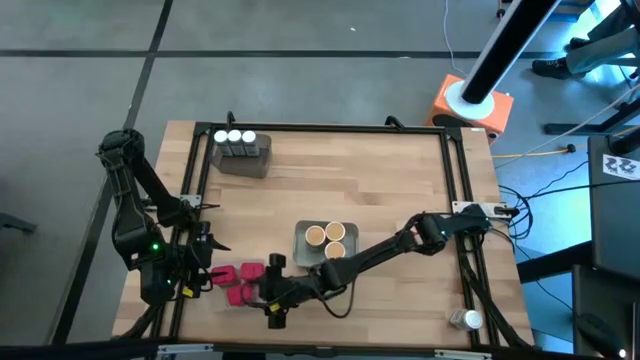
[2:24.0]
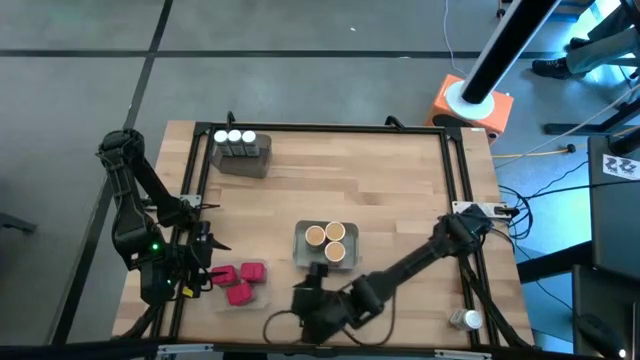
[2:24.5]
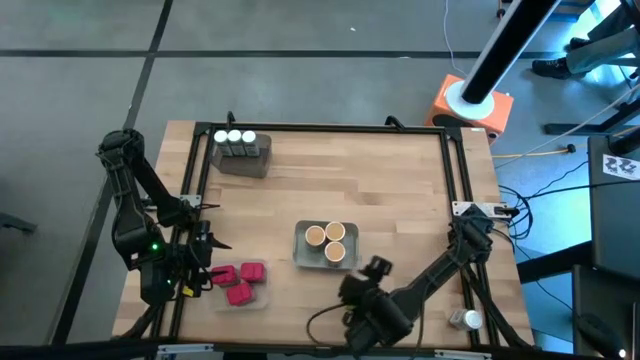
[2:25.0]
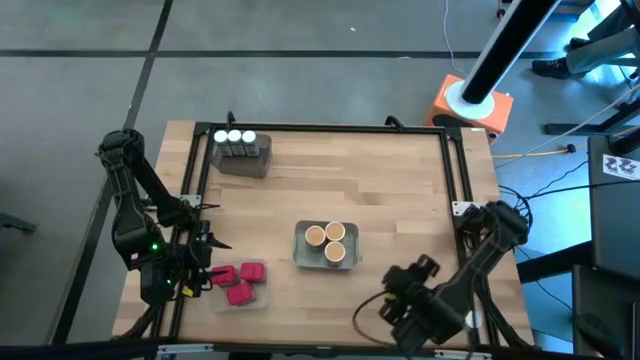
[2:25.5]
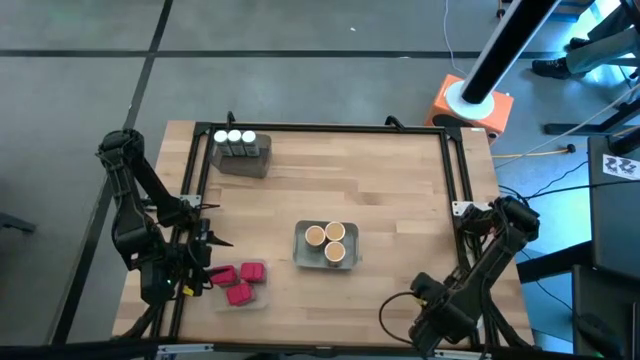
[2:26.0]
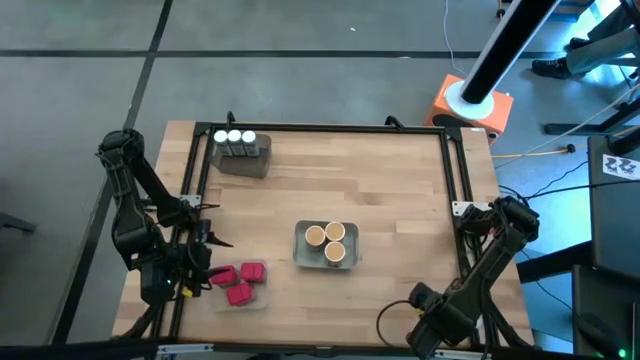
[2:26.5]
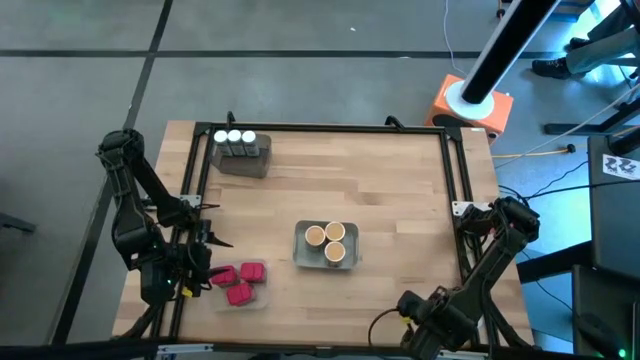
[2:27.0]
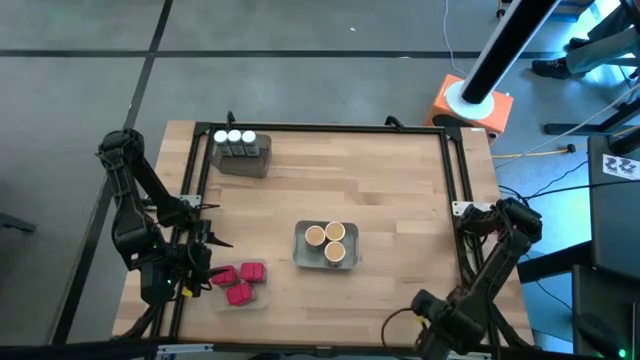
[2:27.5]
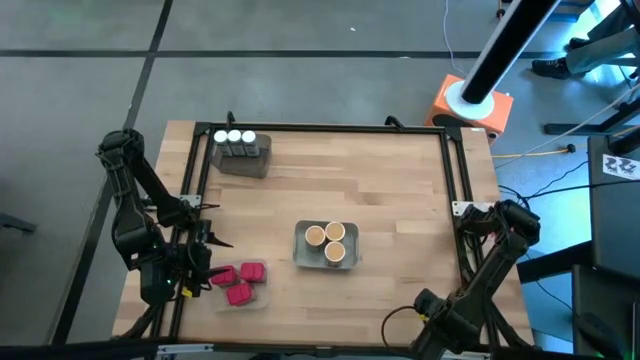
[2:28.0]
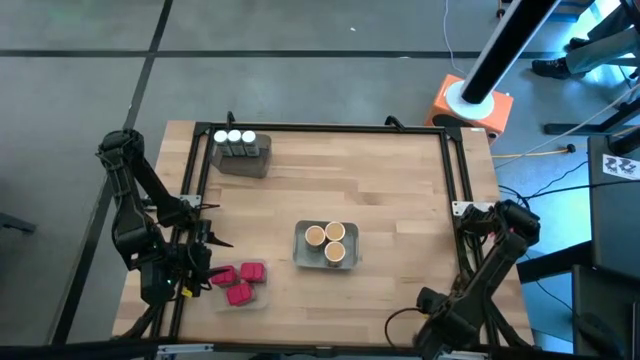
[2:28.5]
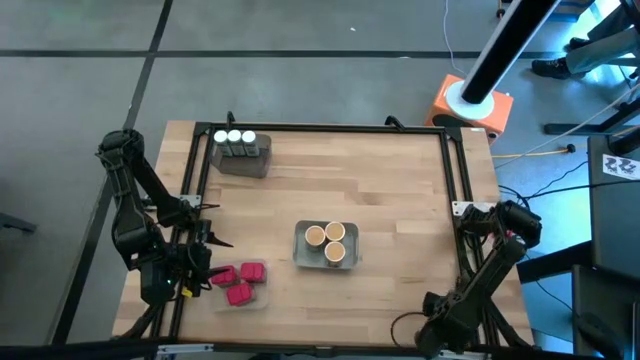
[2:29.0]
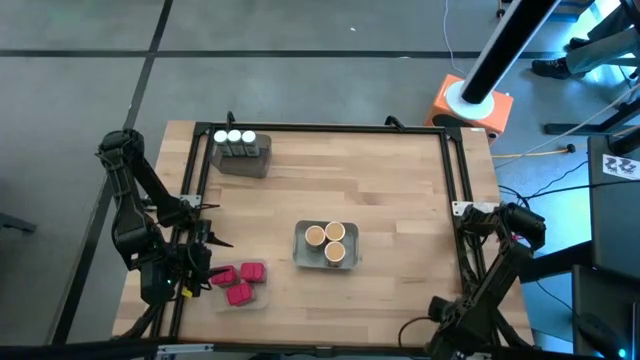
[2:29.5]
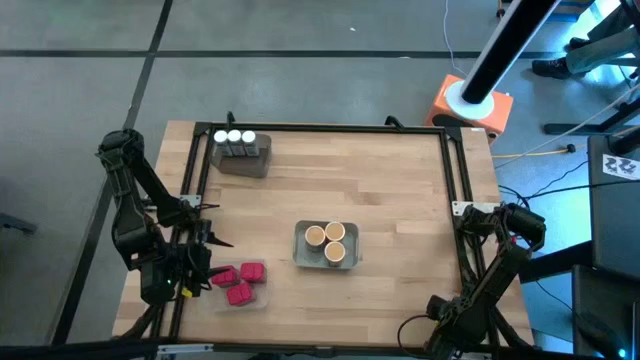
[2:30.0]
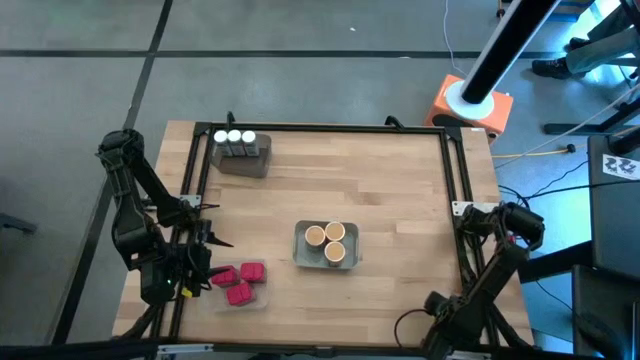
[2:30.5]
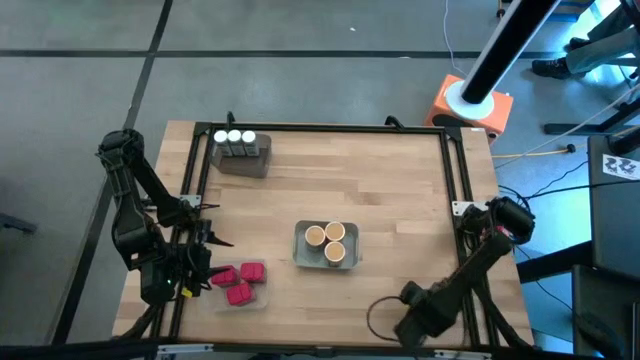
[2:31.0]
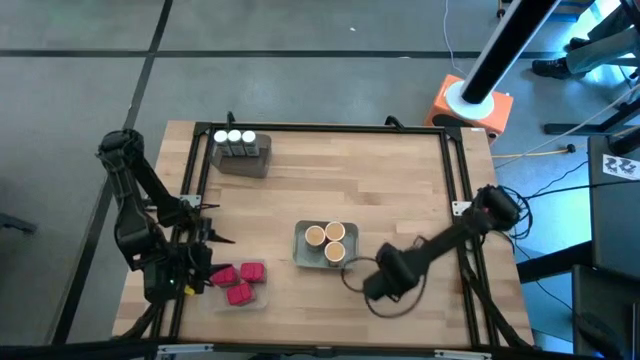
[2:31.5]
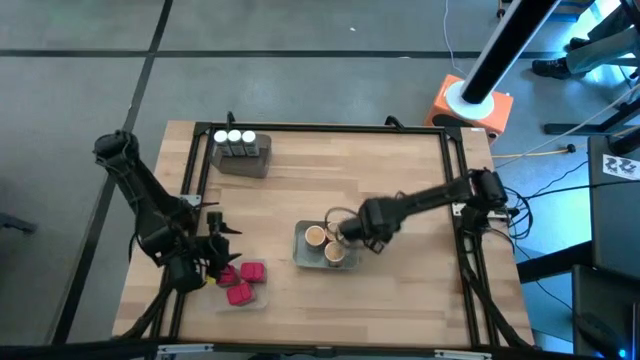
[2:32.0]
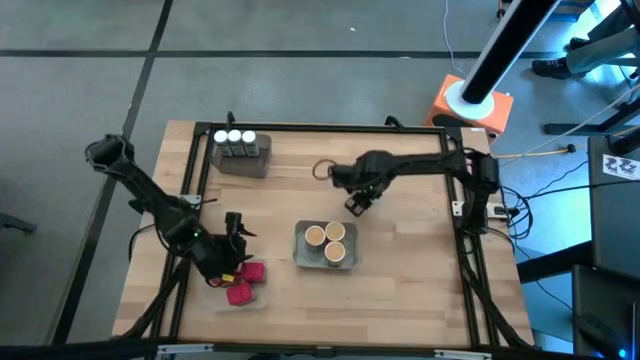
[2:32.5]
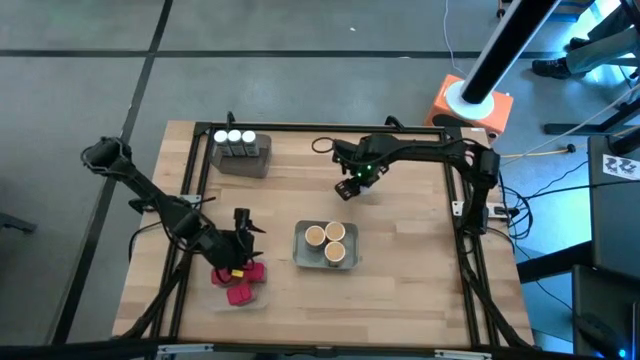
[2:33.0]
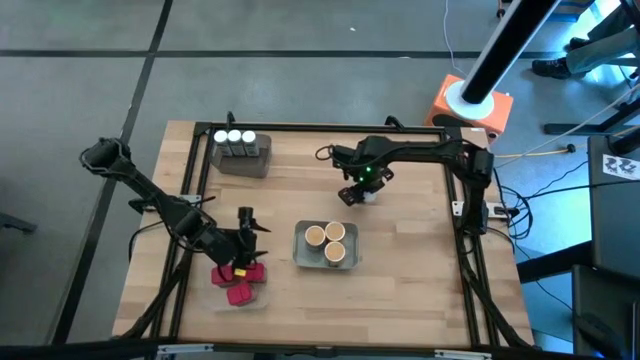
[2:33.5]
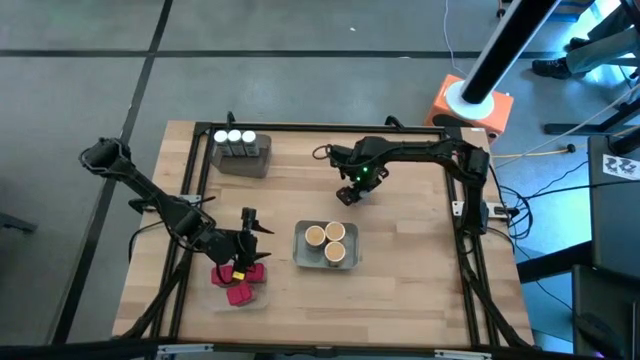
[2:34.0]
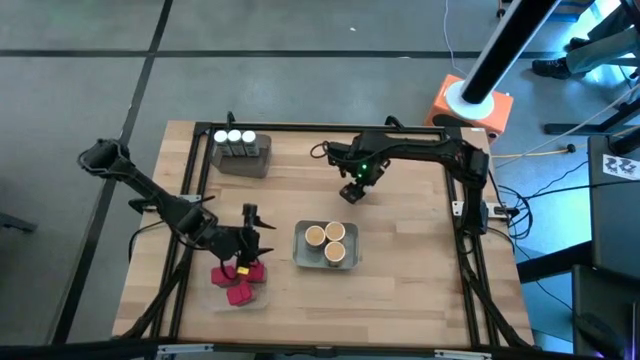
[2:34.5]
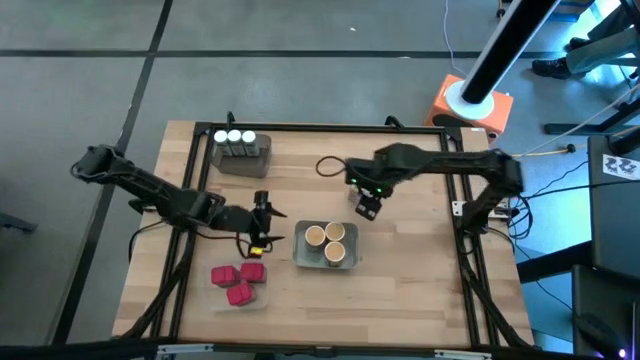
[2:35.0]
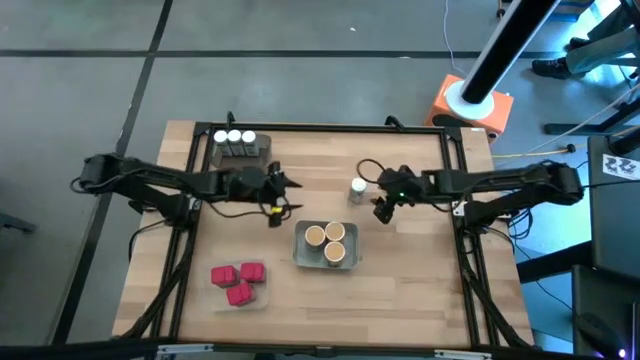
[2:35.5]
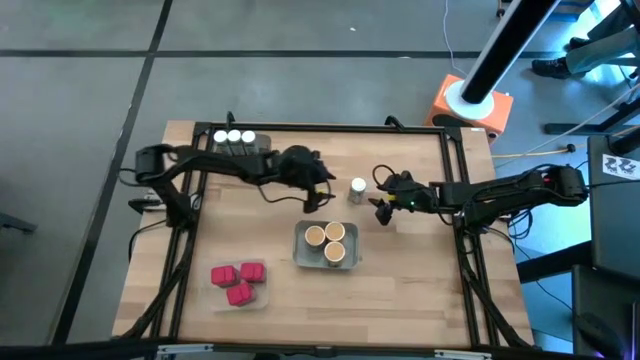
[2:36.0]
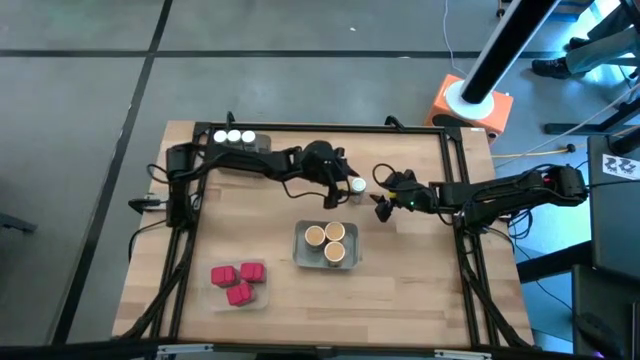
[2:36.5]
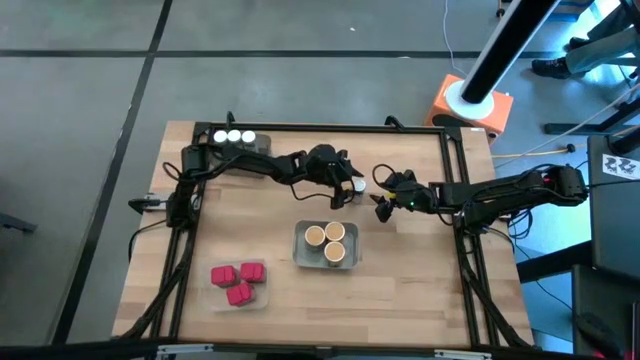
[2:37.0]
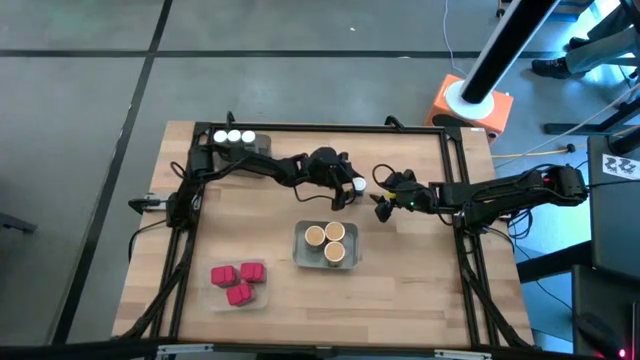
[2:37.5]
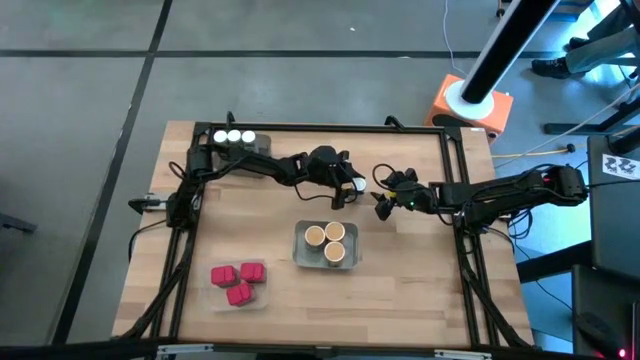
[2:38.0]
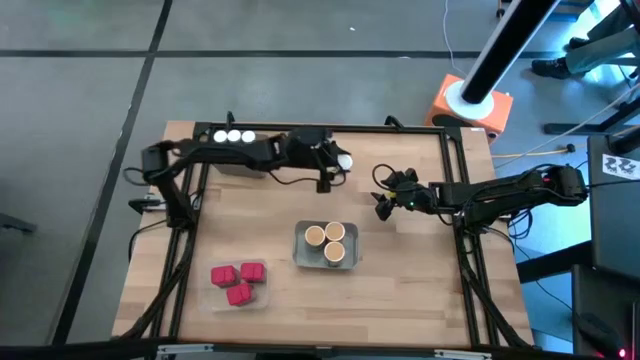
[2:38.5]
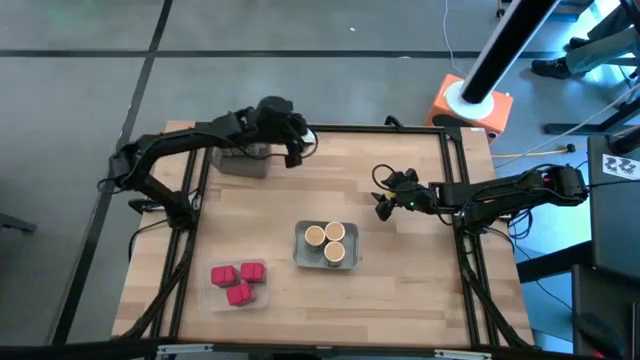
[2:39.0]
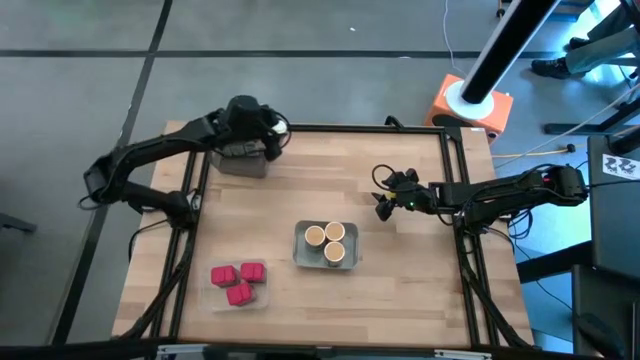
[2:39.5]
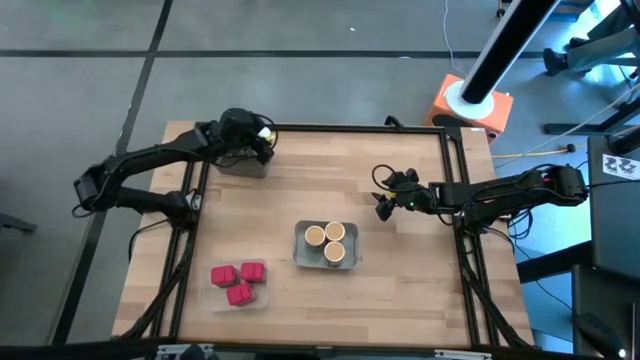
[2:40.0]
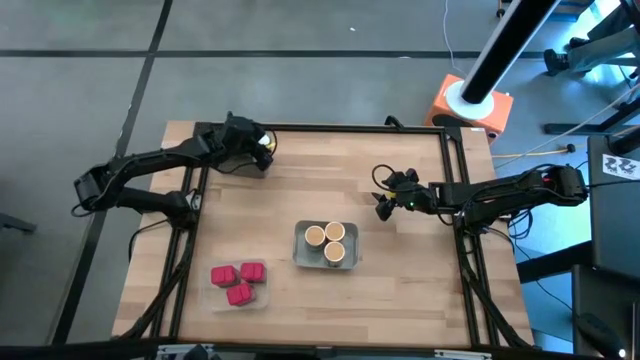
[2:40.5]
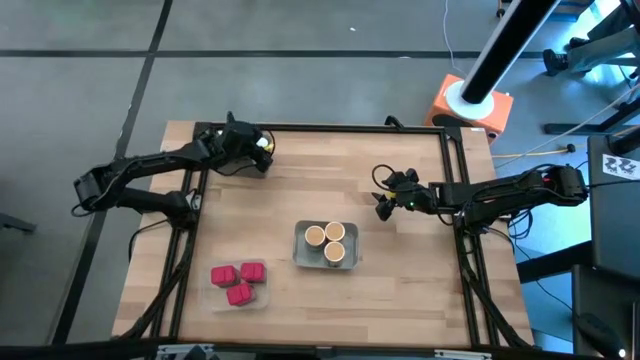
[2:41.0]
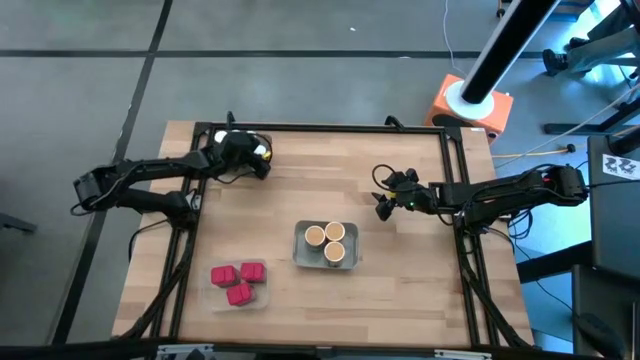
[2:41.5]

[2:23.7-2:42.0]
Task: Sort spices by type
Put the white seasoning bottle into the black bin

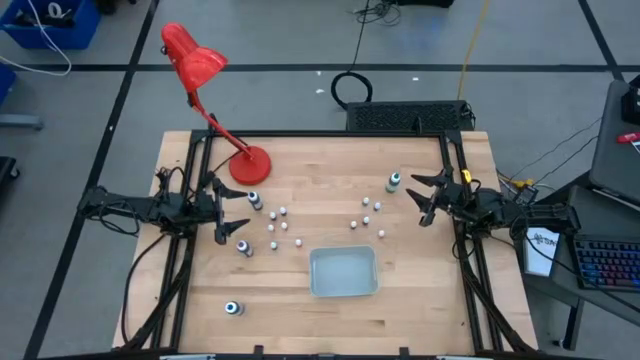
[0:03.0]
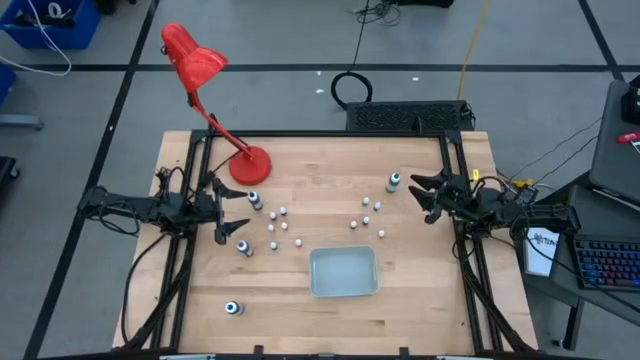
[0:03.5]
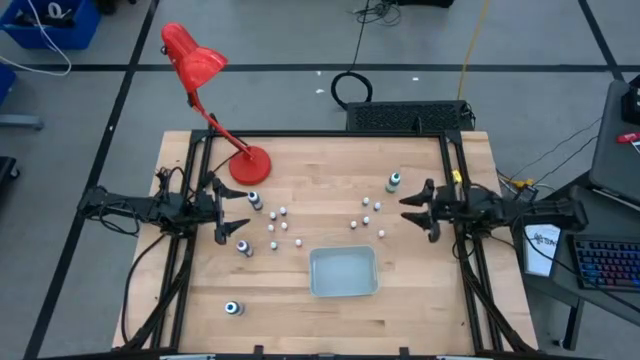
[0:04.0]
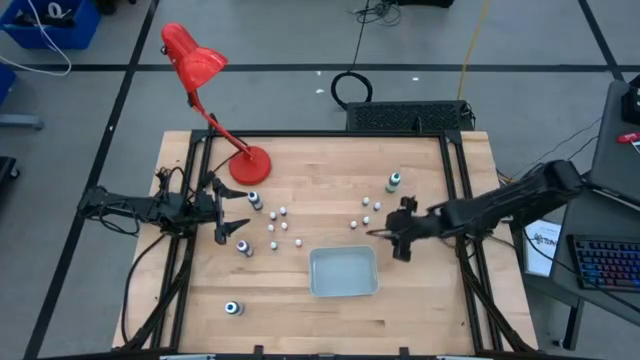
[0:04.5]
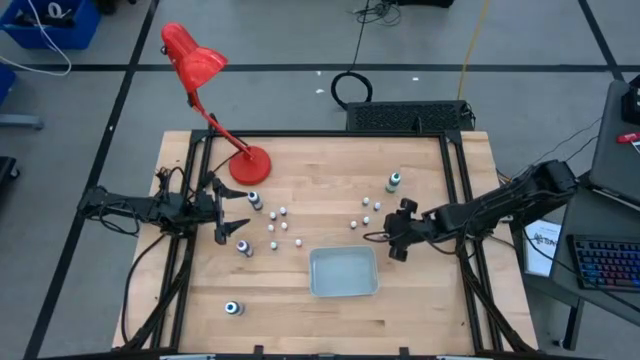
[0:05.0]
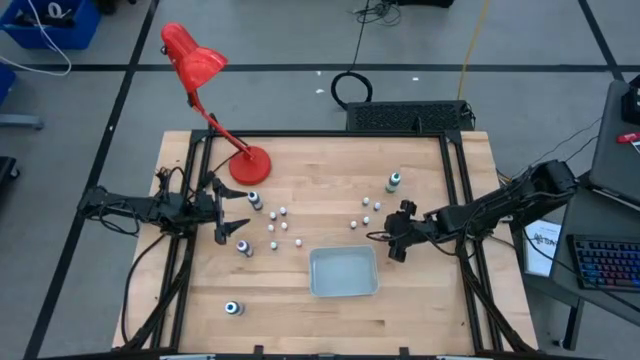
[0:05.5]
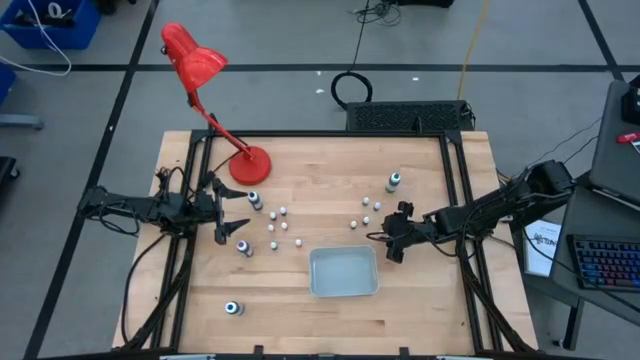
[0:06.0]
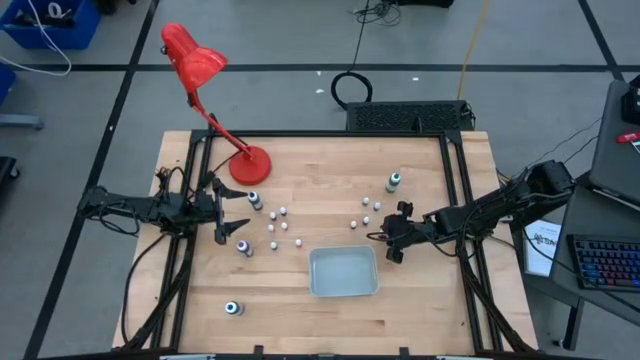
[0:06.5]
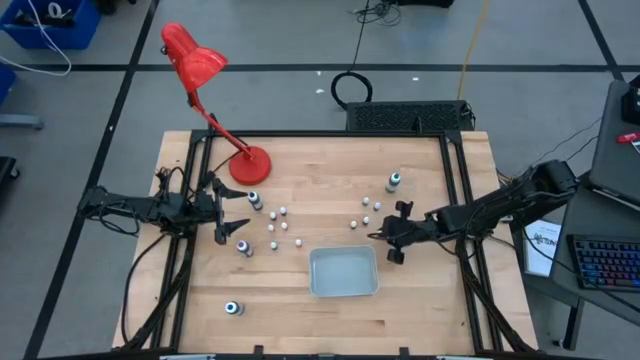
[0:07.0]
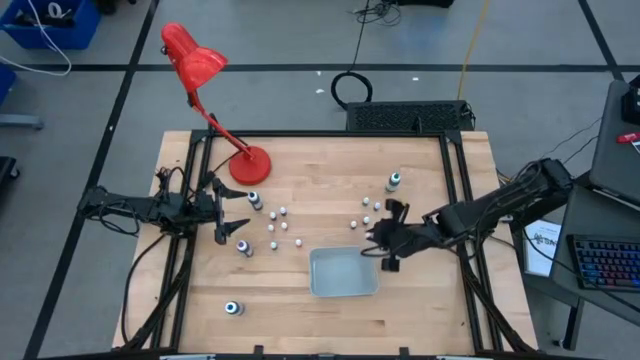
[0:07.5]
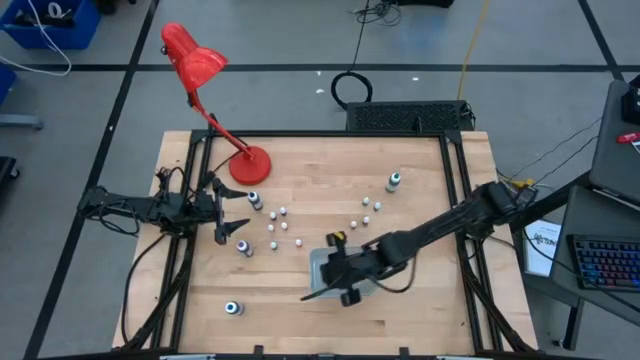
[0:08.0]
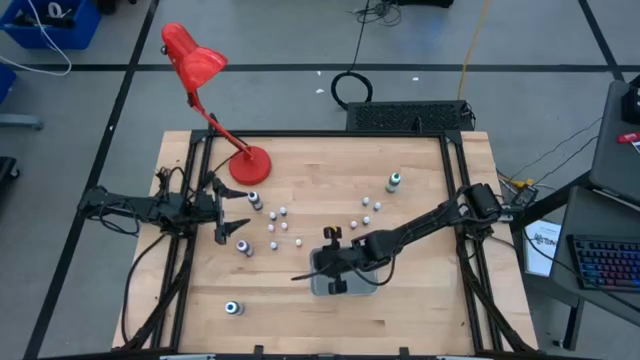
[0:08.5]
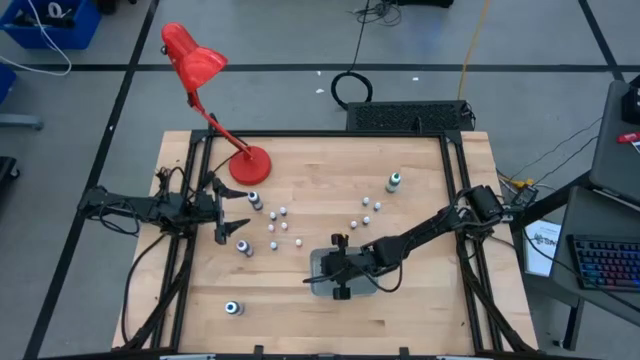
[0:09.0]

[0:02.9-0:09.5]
Task: Pick & Place food coloring
Put the small orange food coloring bottle into the gray bin
